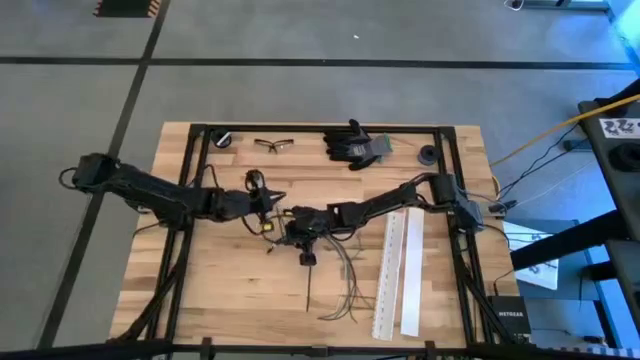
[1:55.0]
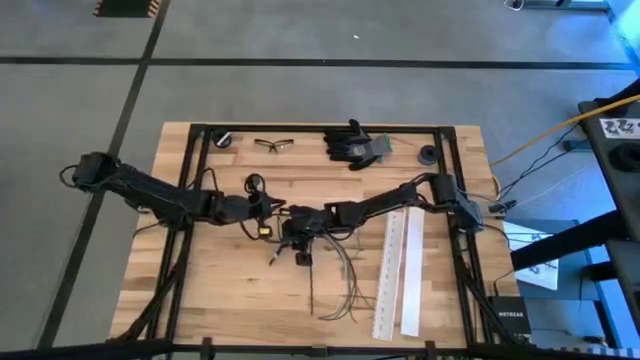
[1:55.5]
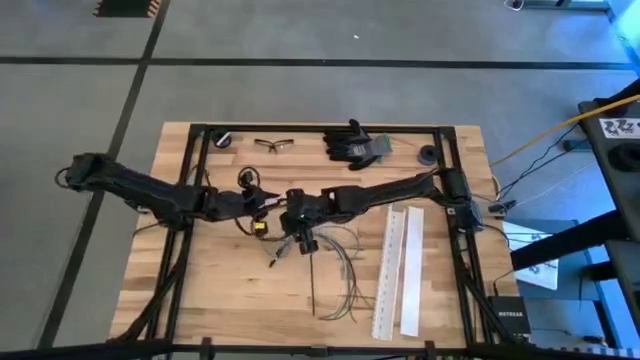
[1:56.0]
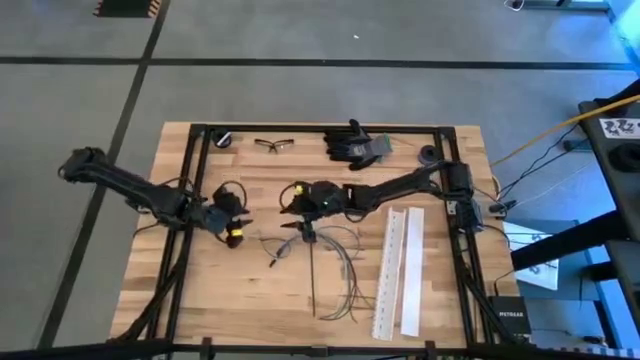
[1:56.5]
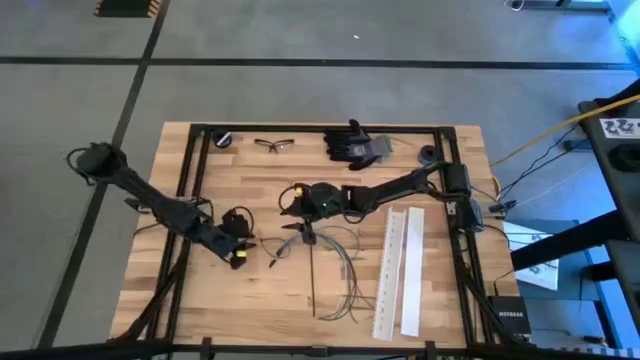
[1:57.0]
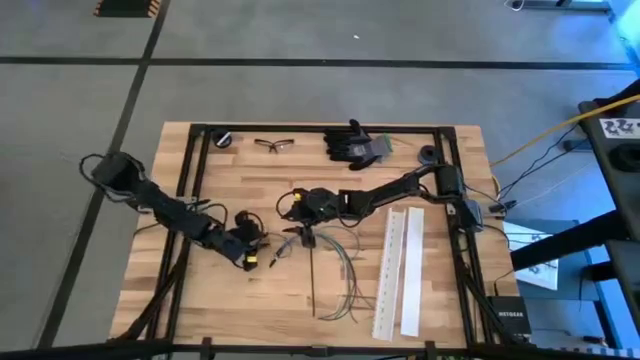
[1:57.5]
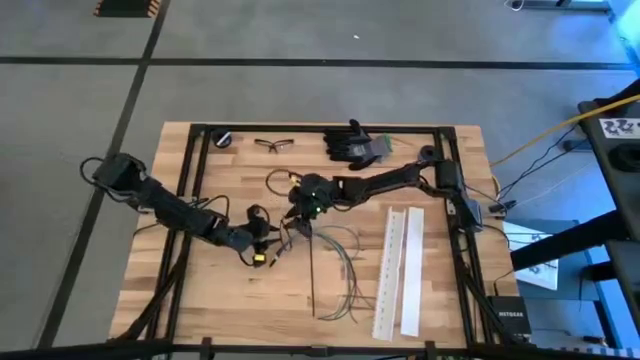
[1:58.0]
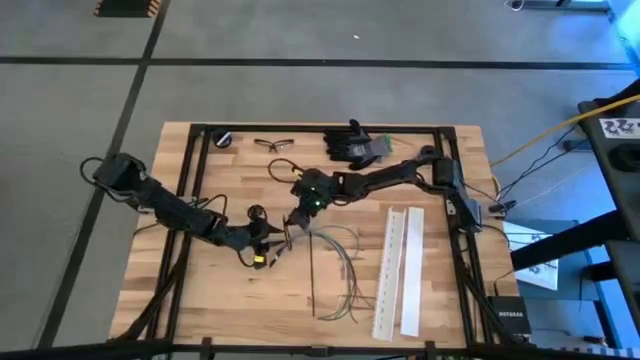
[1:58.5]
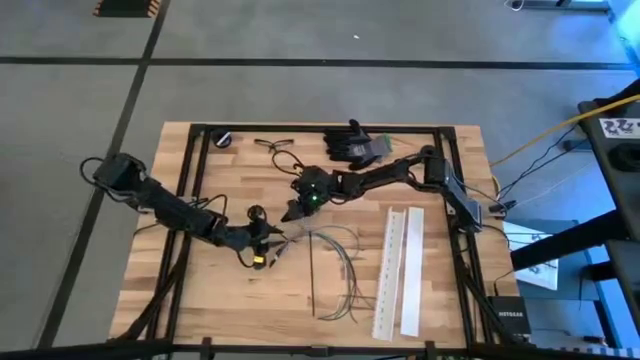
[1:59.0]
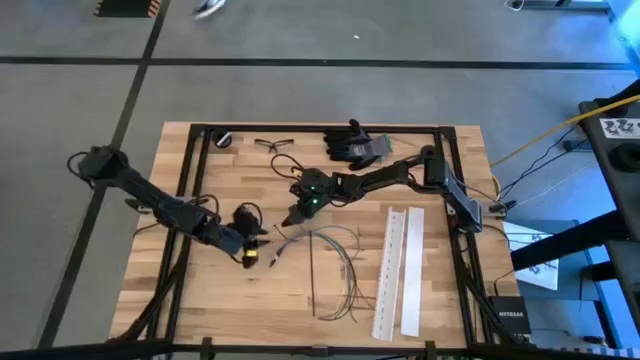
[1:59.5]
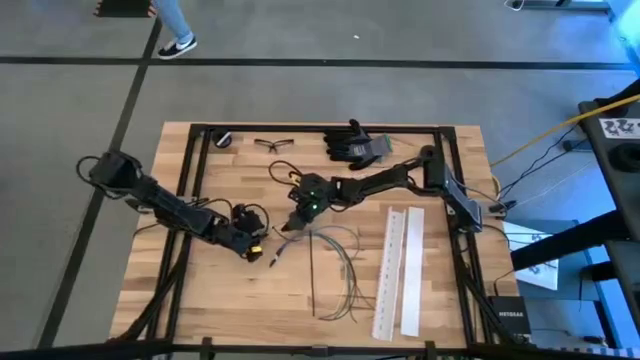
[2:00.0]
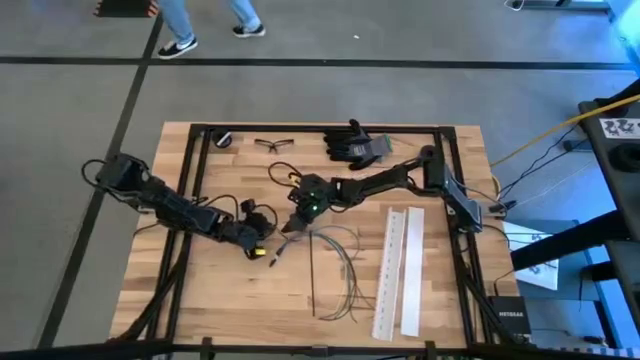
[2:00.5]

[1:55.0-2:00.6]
Task: Ziptie cables
Wrap the zip tie on the cables

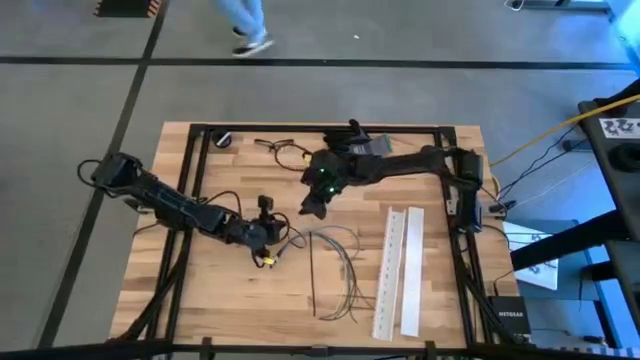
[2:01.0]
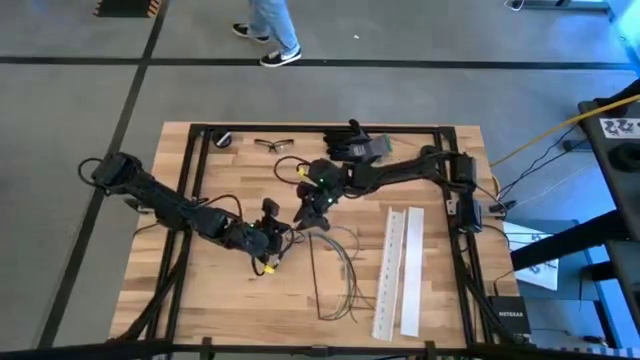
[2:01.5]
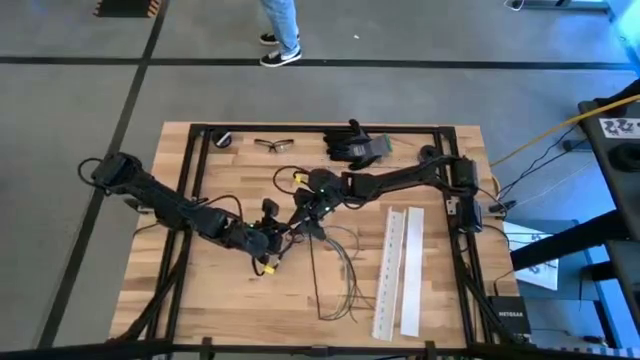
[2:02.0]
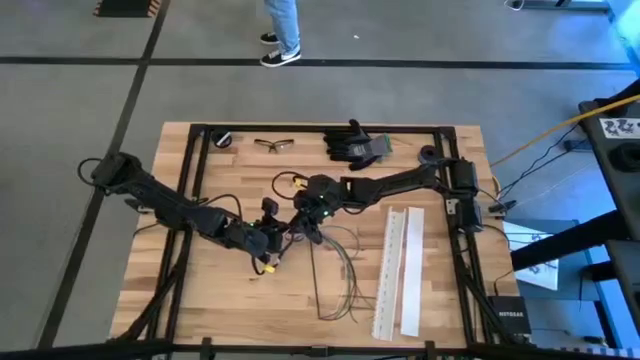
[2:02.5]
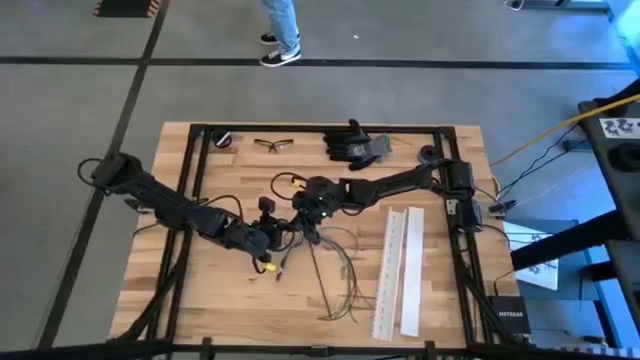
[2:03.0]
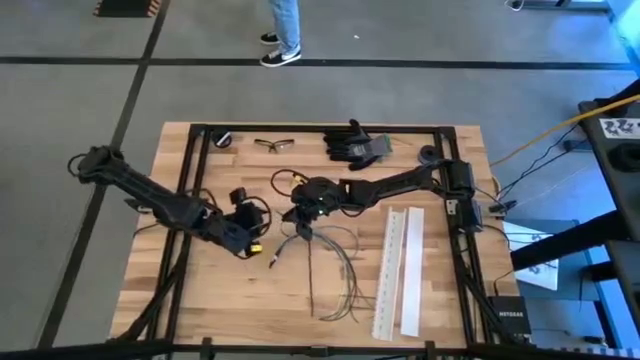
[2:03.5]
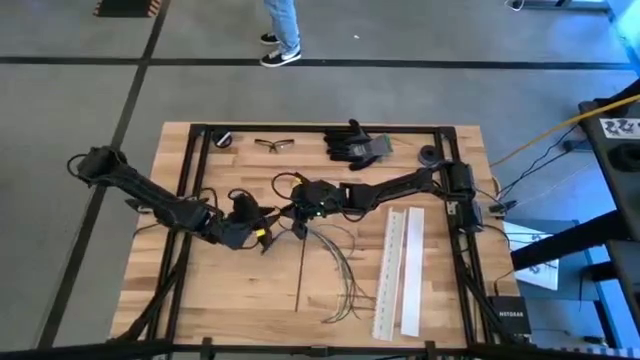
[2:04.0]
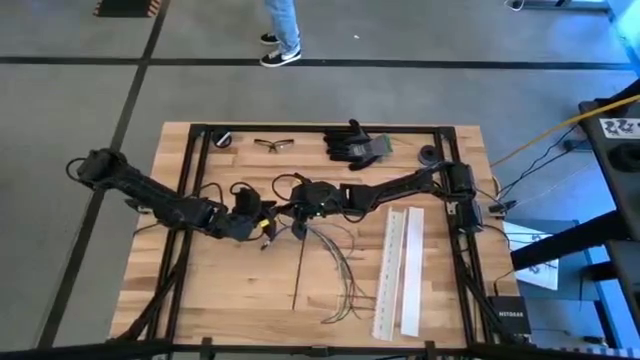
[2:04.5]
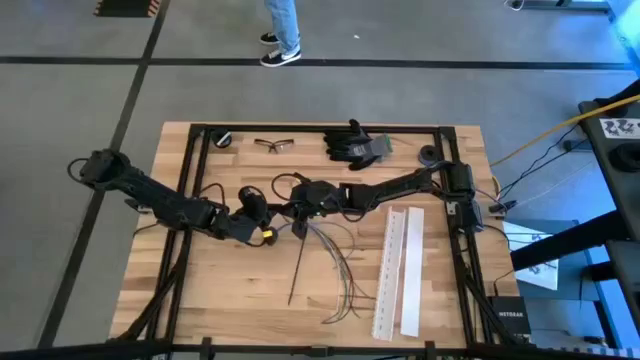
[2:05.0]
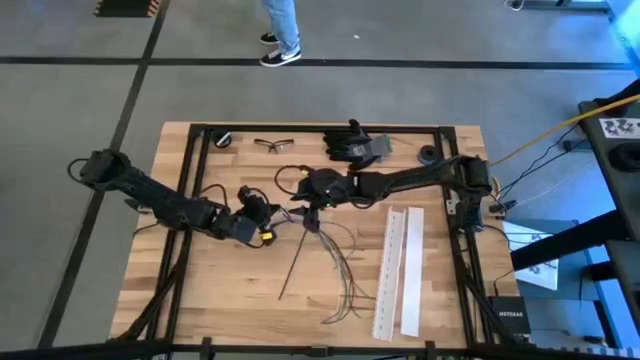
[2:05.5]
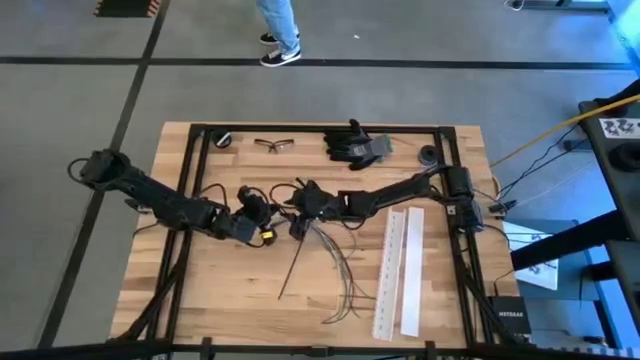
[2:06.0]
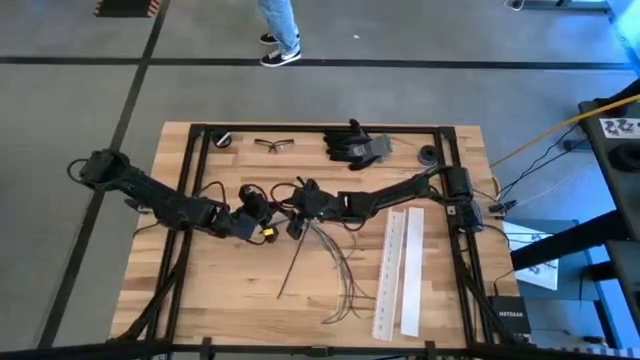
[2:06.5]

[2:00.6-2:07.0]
Wrap the zip tie on the cables

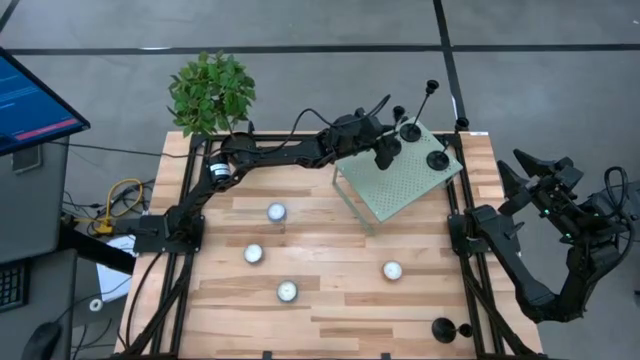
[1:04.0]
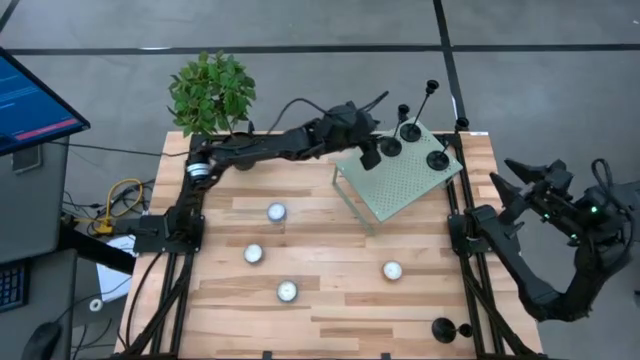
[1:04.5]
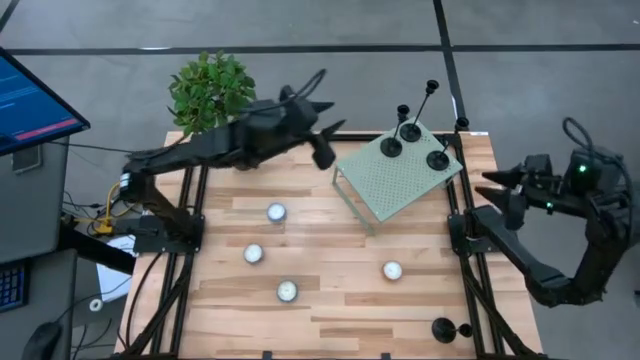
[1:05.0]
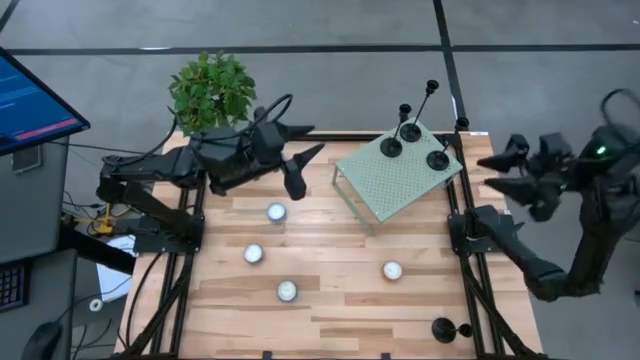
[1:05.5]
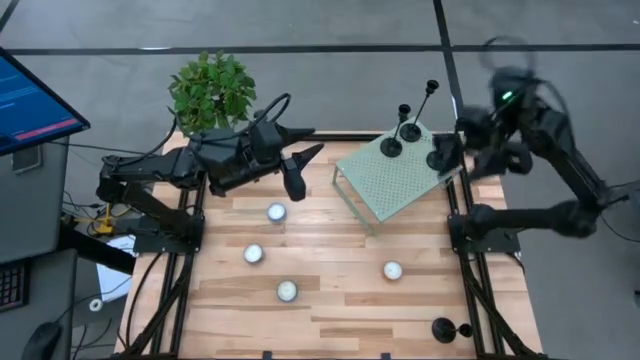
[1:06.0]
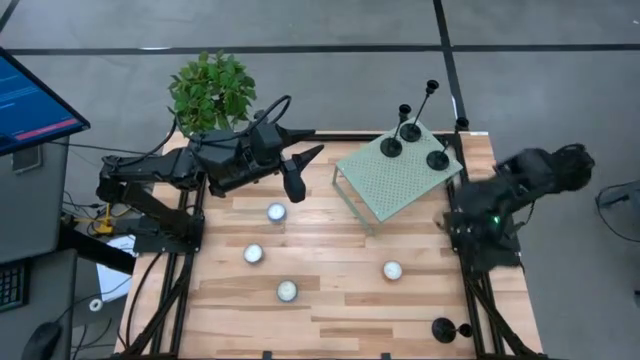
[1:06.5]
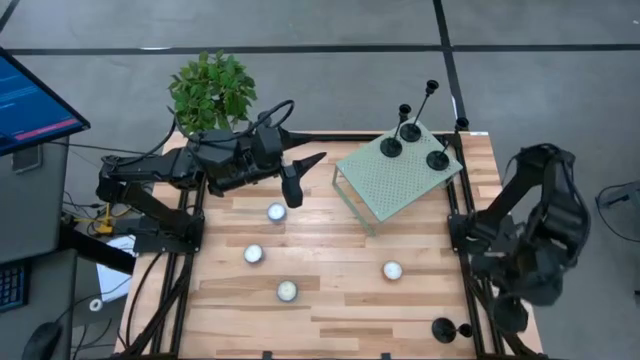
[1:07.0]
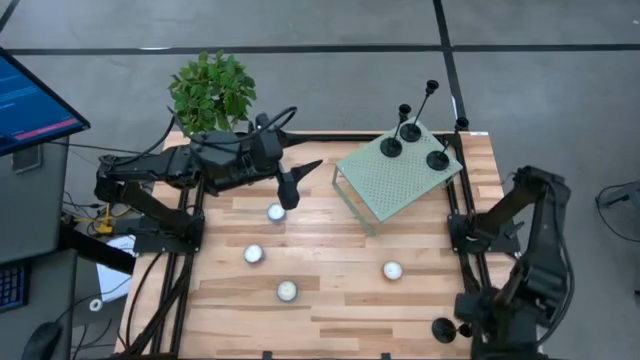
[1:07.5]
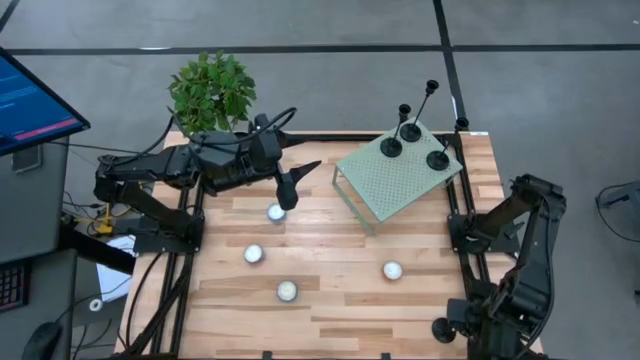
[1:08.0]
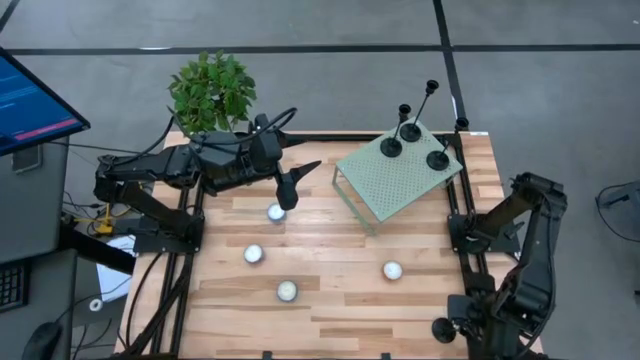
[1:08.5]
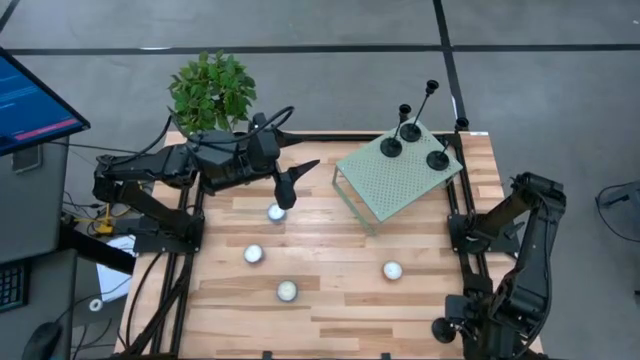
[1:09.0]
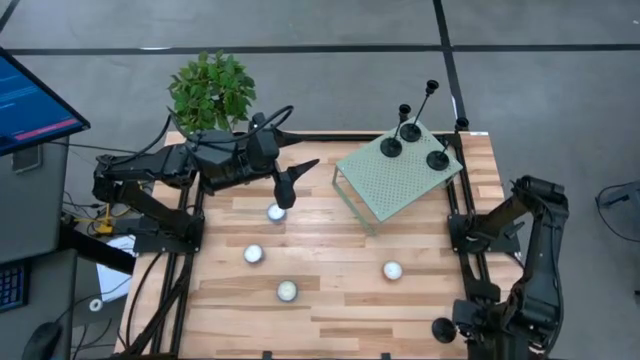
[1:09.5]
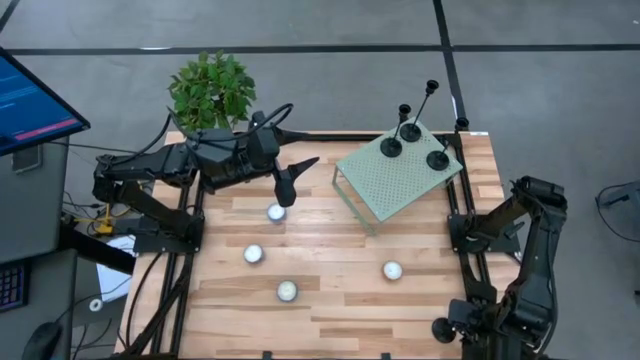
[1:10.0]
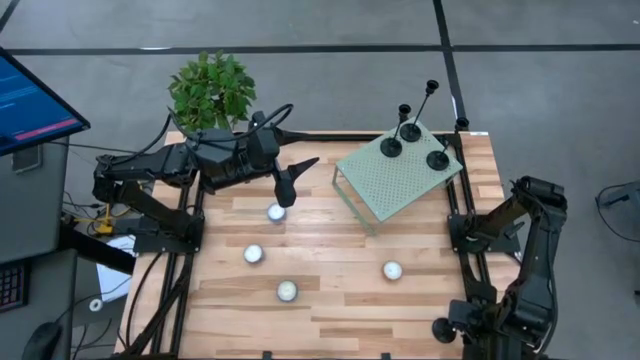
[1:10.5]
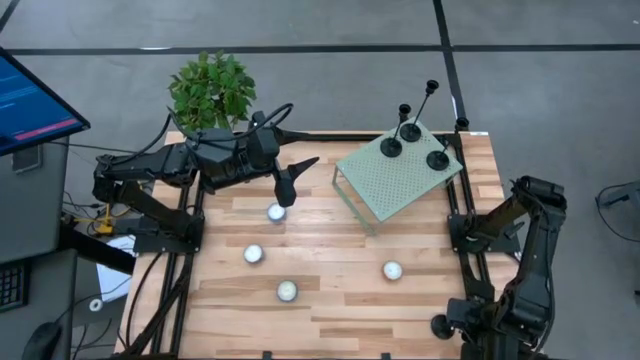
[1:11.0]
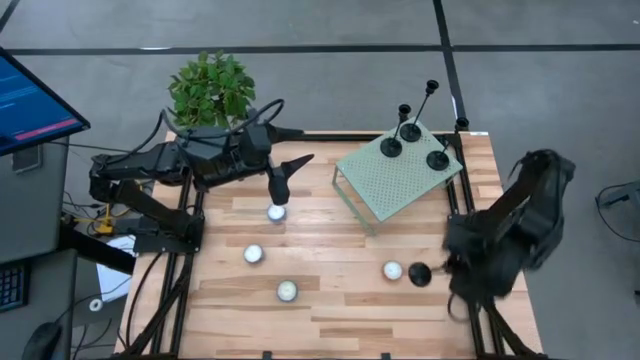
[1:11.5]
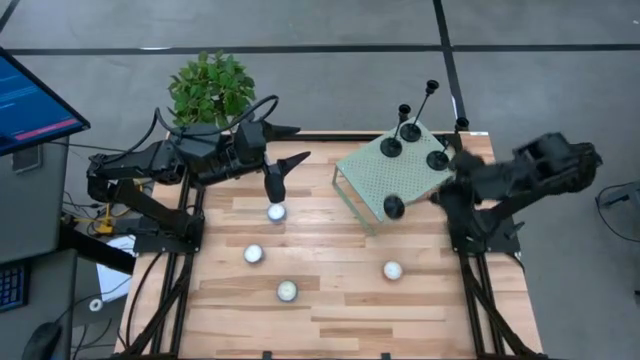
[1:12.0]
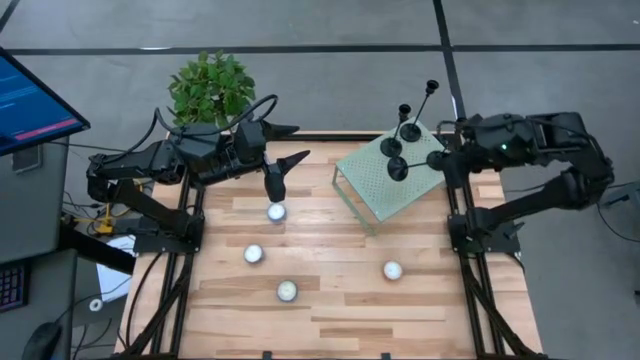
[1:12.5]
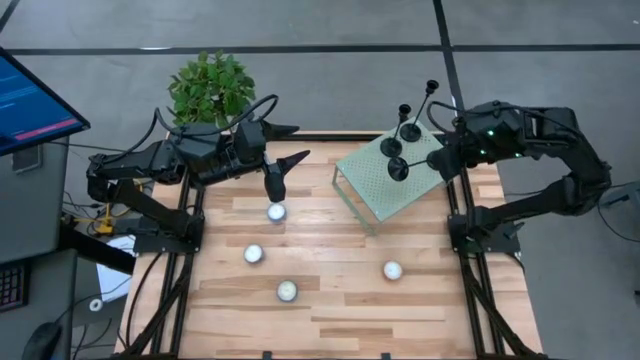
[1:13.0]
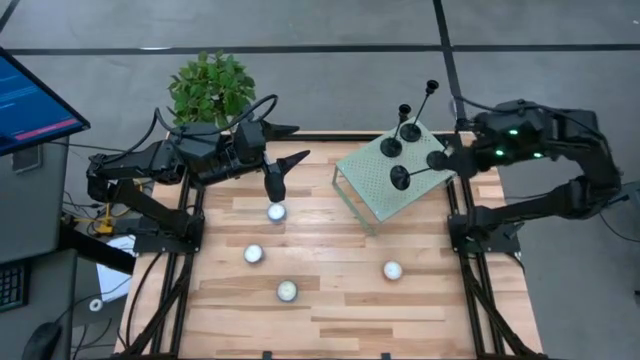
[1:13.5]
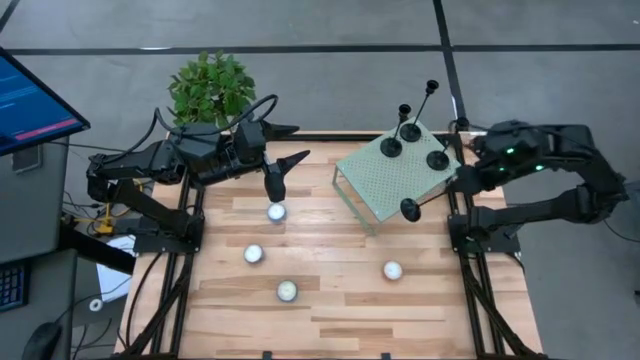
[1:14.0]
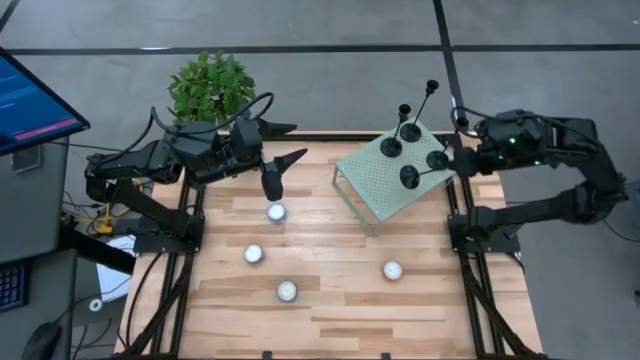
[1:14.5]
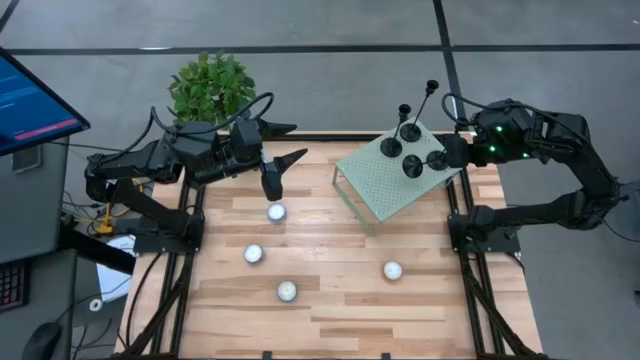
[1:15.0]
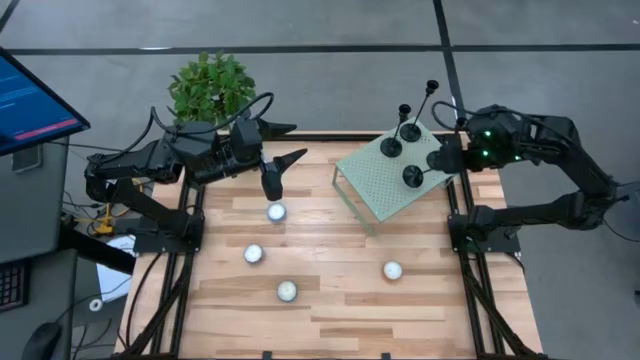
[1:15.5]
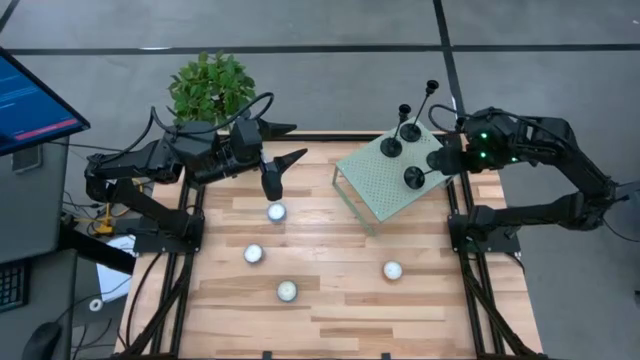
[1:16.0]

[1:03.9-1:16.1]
Task: Pick & Place candle stick holders
Align the black candle holder with the bottom left black candle holder on the shelf
